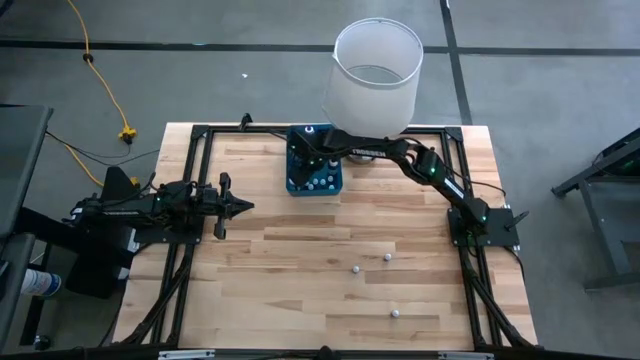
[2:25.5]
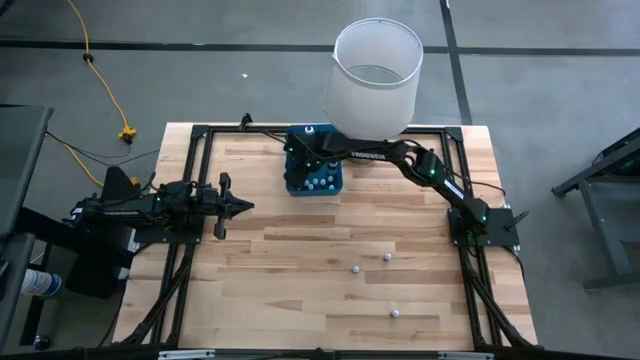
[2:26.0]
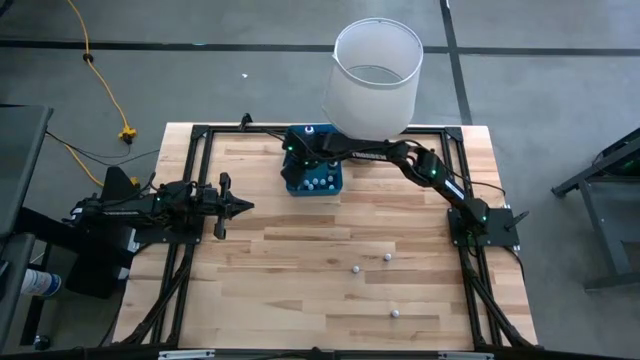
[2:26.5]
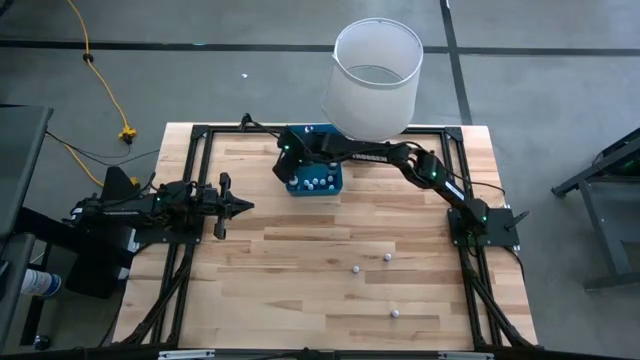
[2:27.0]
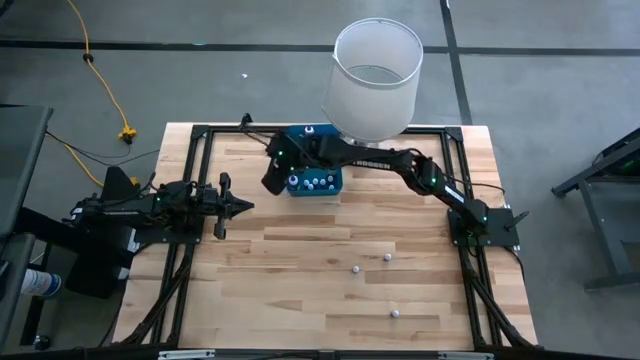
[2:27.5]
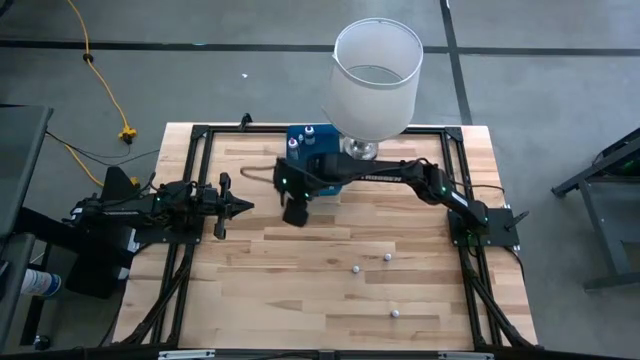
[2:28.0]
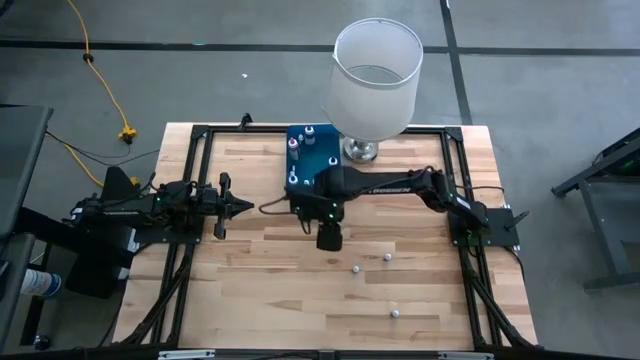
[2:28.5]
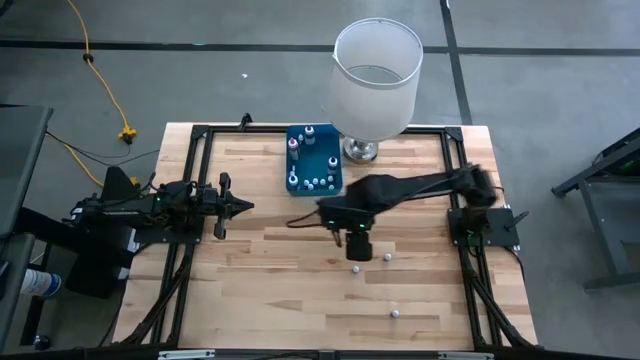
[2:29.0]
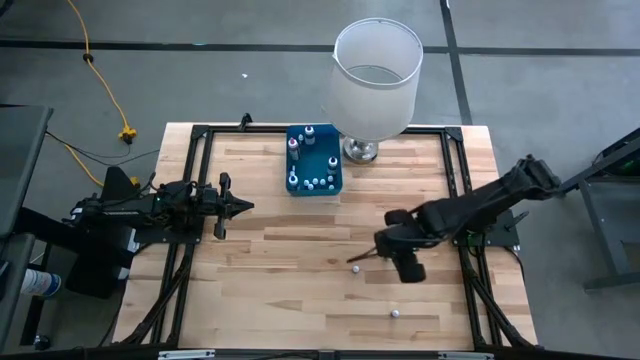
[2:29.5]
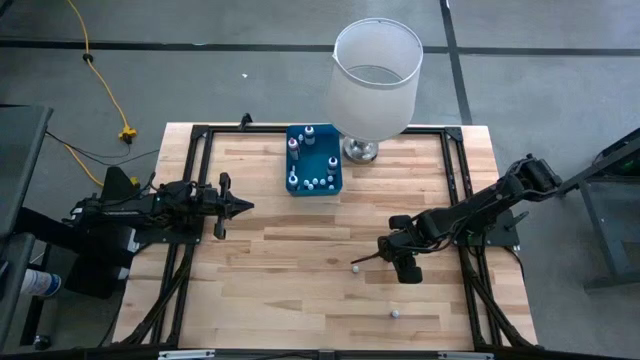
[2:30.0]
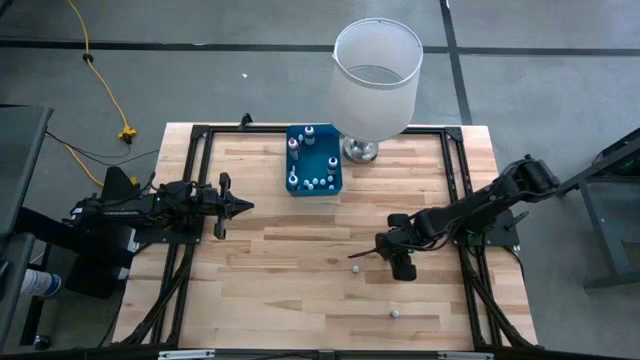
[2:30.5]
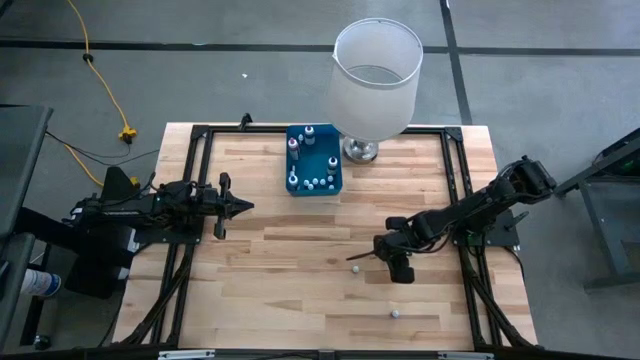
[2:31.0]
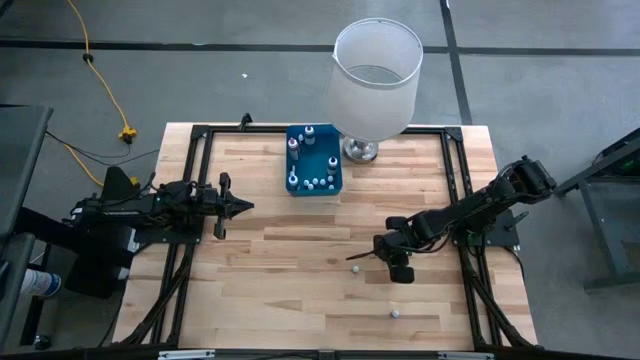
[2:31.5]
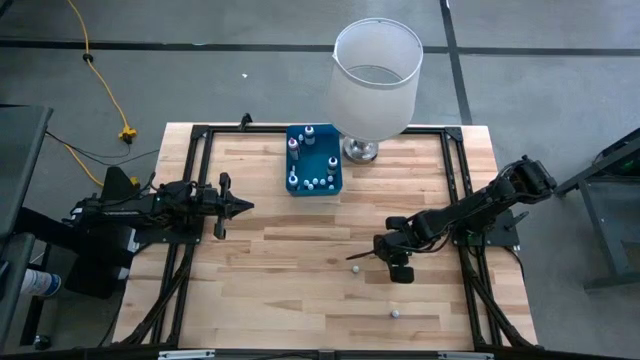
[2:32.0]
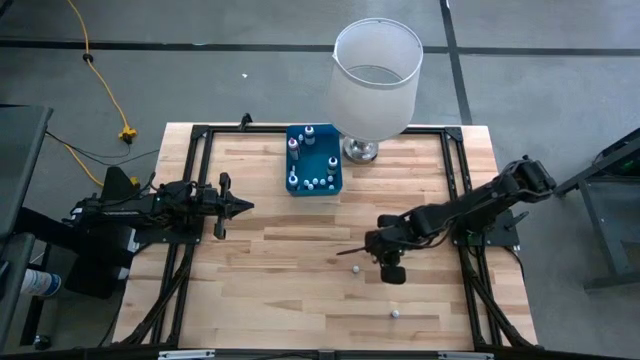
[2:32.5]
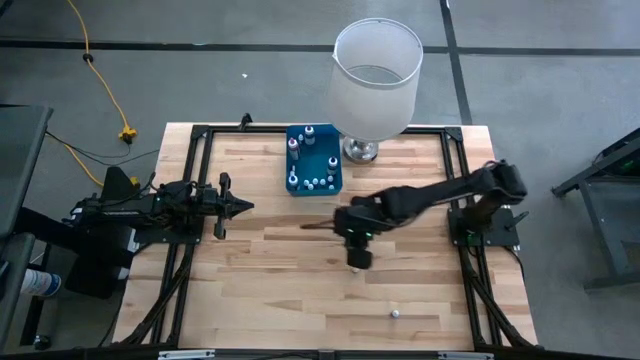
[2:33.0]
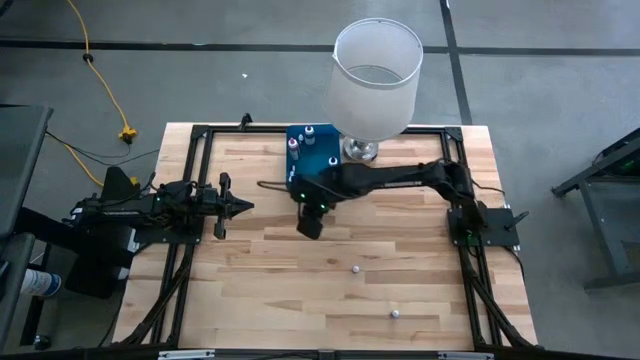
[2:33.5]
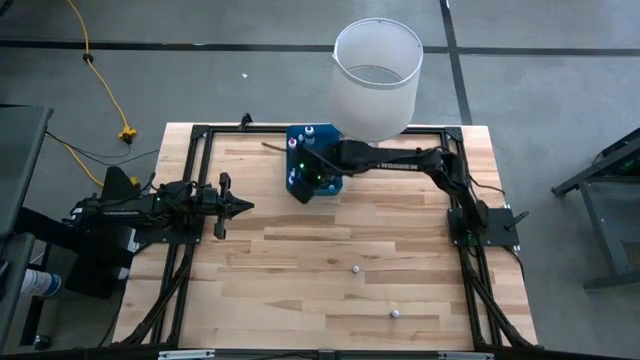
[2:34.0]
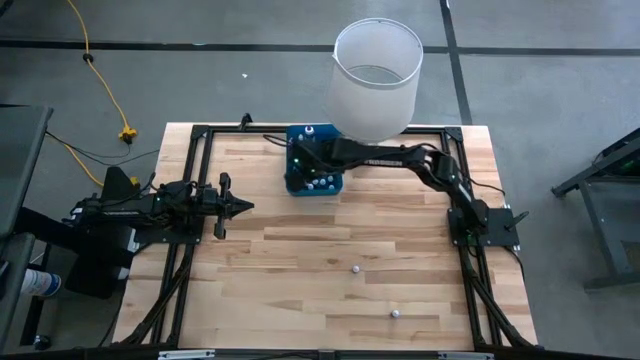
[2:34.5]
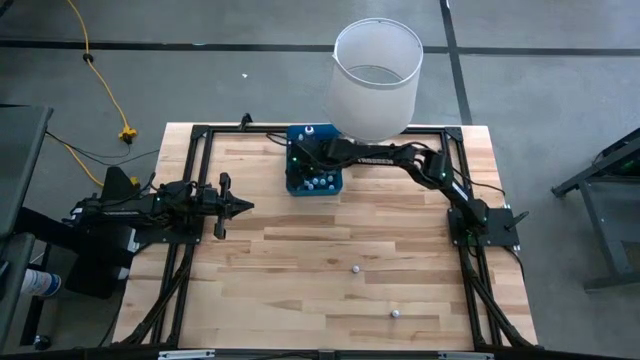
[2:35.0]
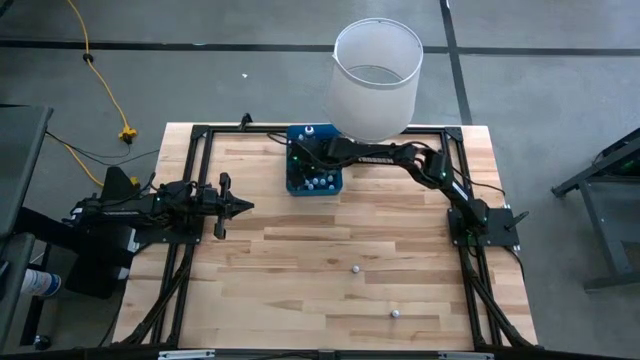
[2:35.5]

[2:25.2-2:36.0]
Task: Pick & Place food coloring
Put the right small blue food coloring bottle into the blue bin

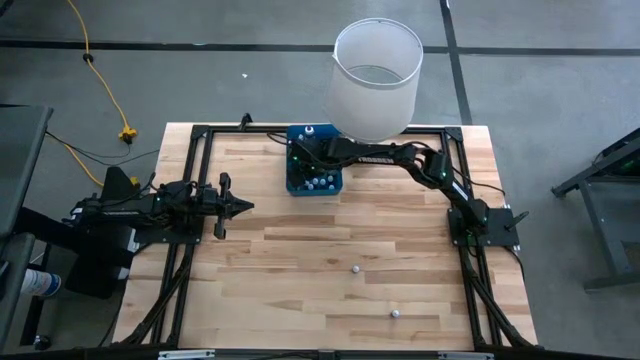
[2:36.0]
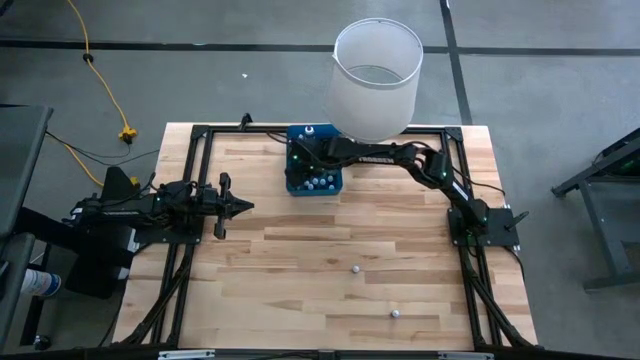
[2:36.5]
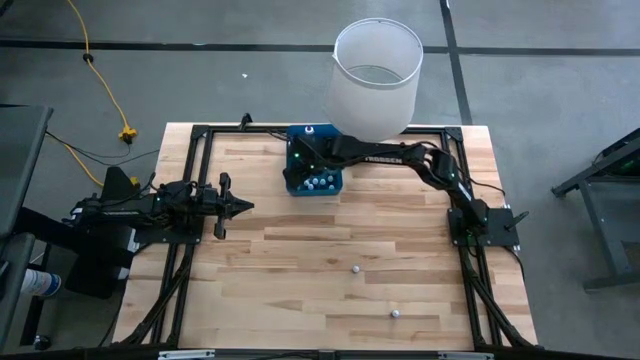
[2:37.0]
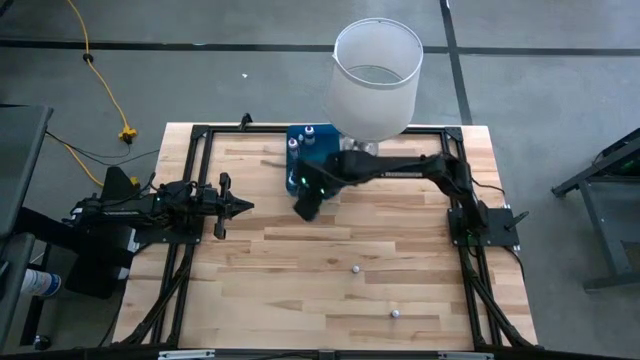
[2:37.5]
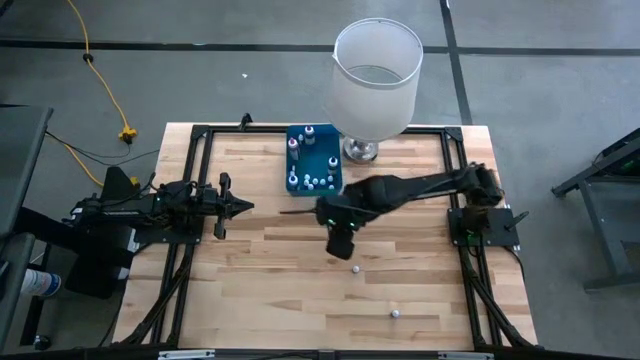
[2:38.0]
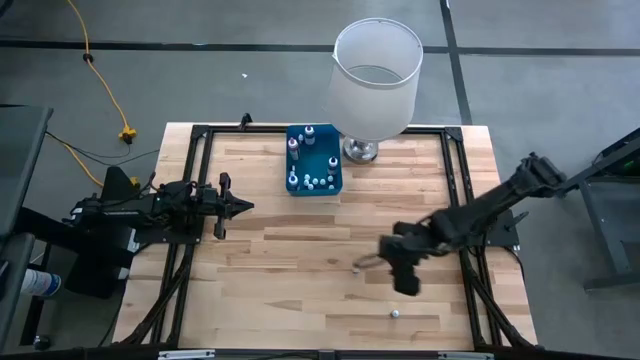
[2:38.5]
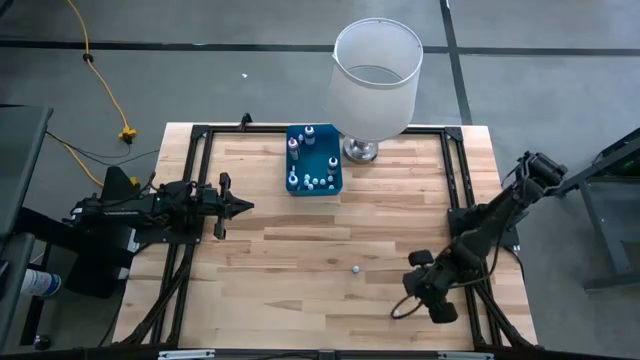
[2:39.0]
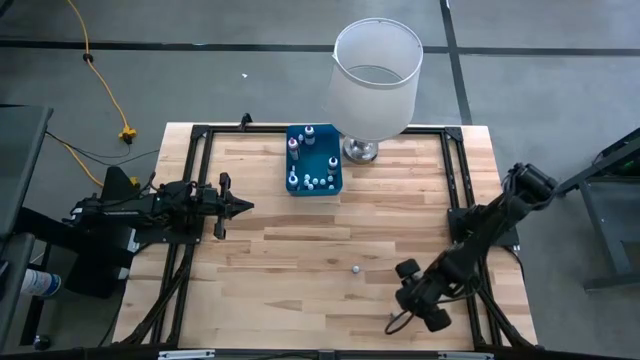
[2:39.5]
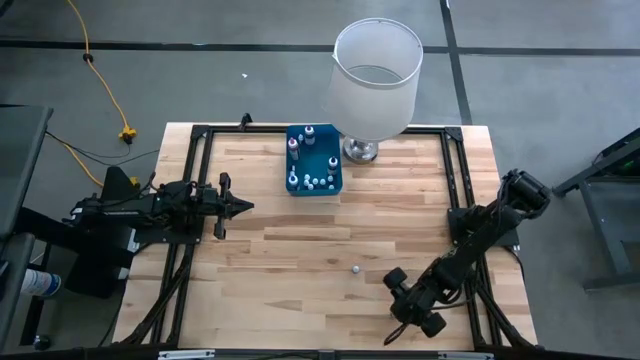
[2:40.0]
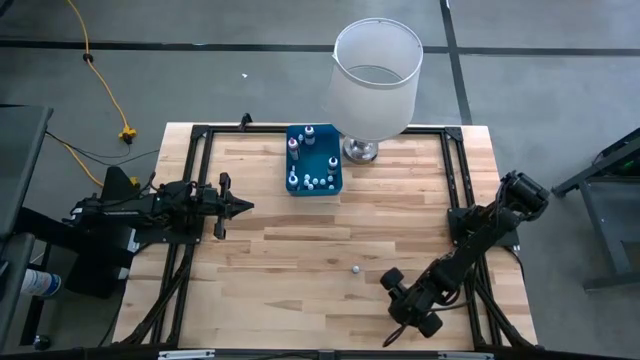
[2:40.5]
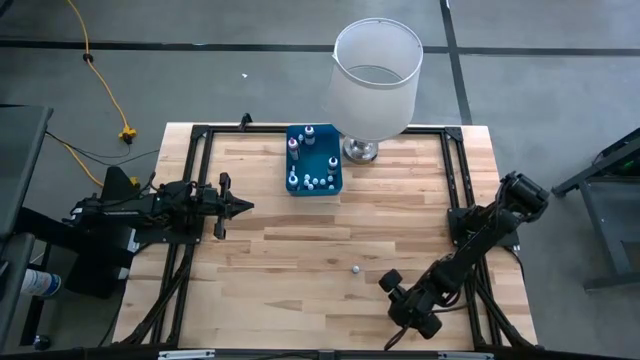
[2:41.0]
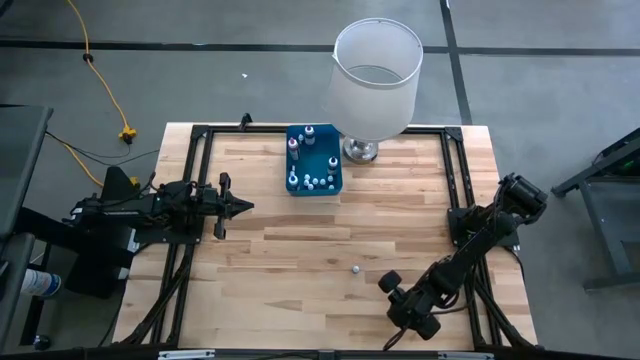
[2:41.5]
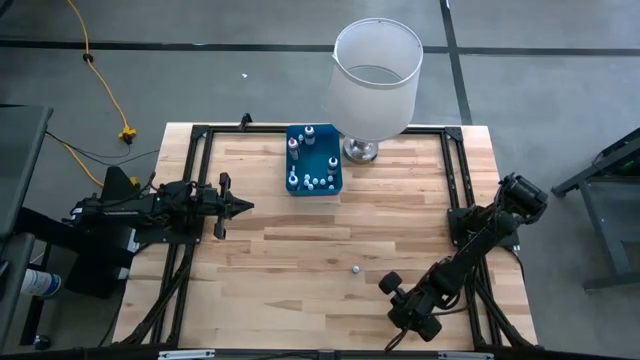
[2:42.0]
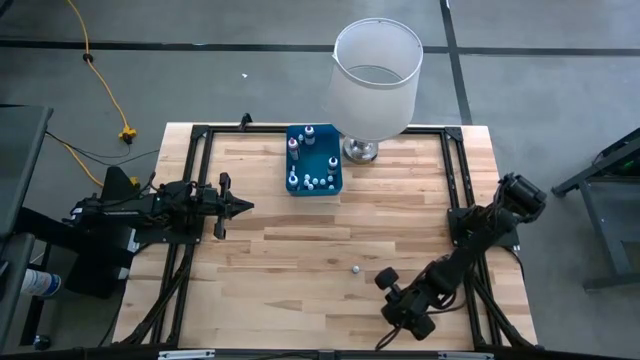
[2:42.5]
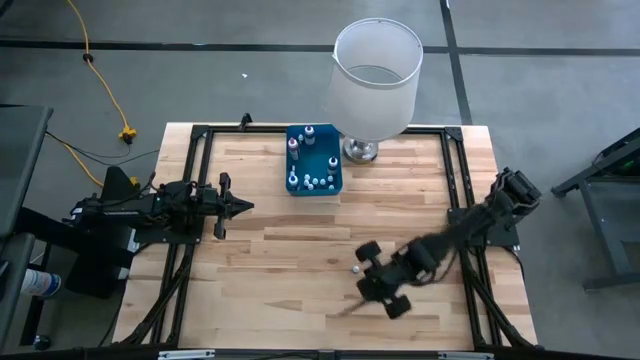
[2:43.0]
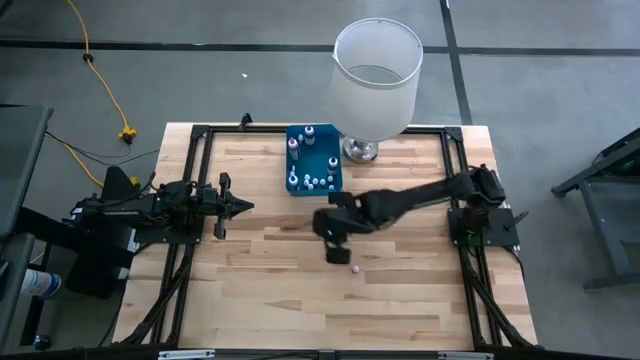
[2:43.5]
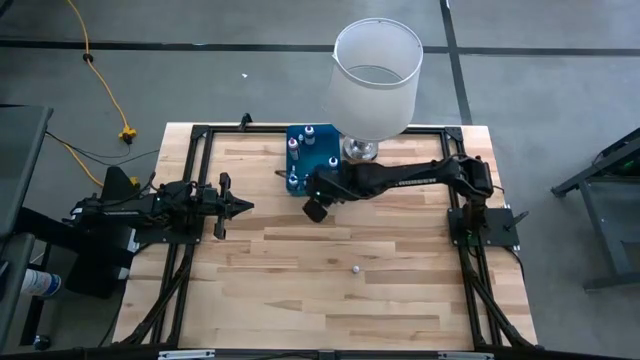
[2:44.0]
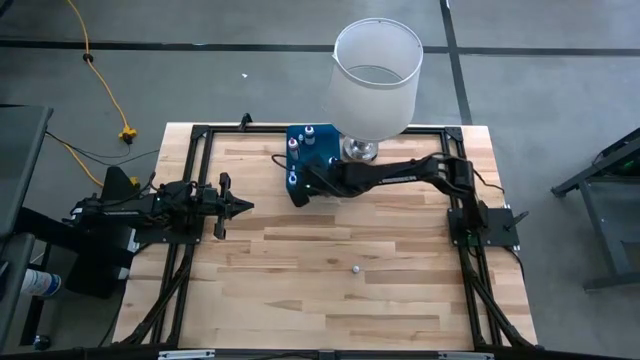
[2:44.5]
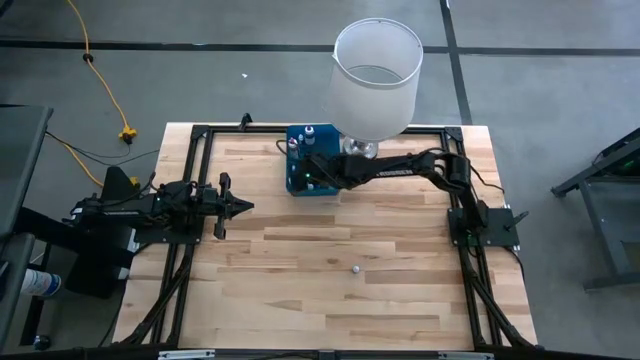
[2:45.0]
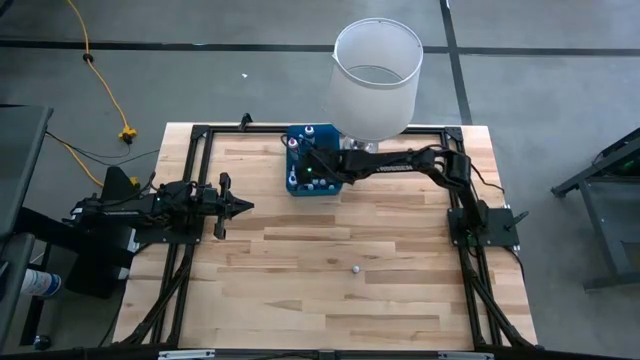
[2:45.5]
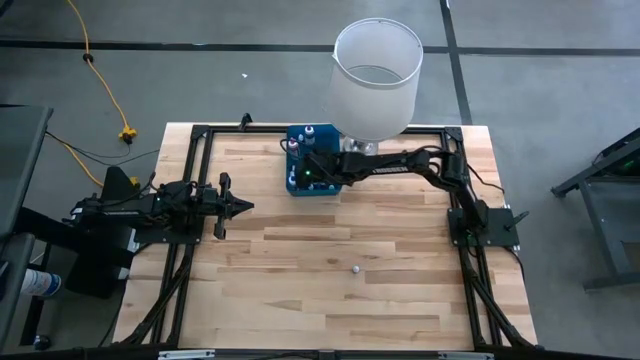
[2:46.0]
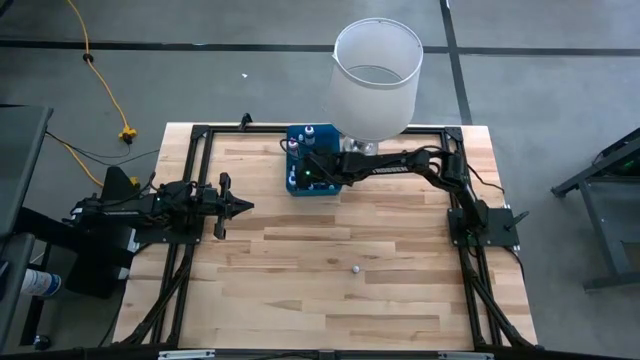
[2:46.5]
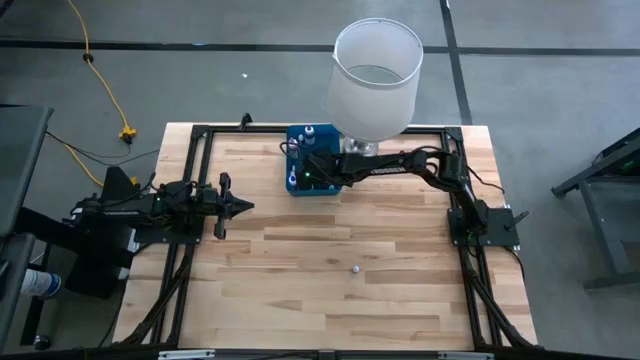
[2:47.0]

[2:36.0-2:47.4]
Put the small black food coloring bottle into the blue bin
